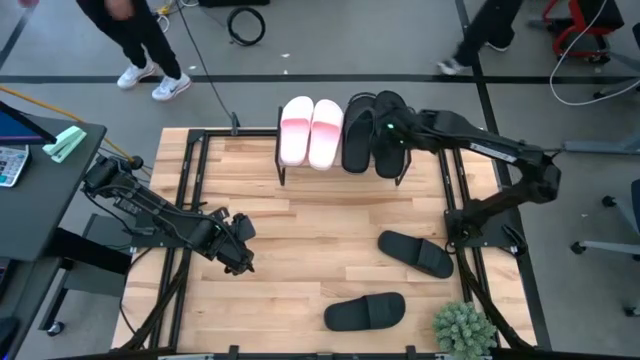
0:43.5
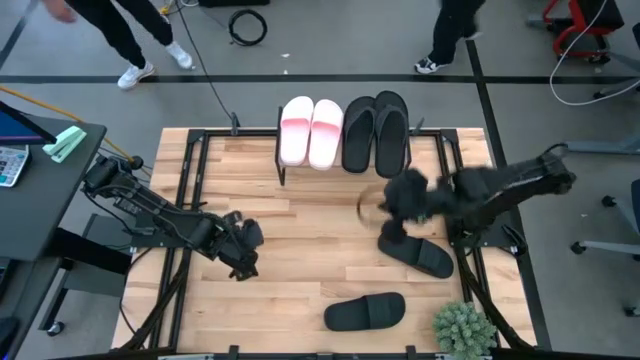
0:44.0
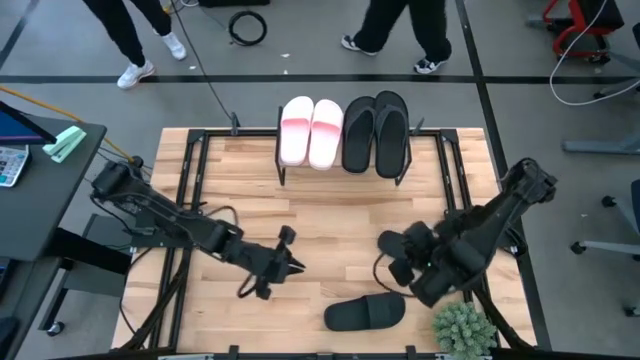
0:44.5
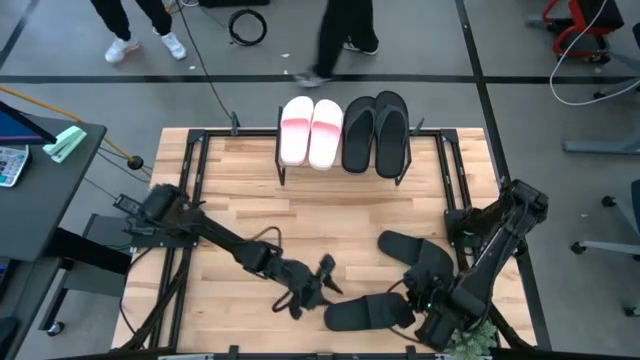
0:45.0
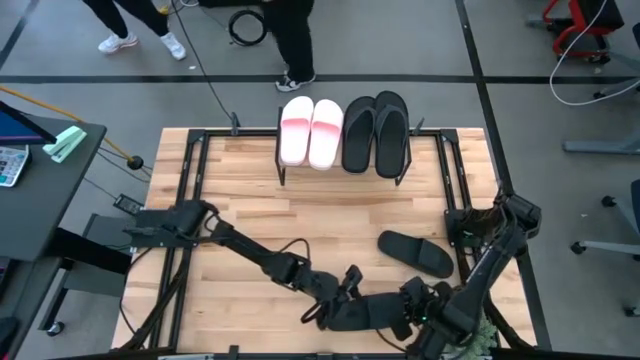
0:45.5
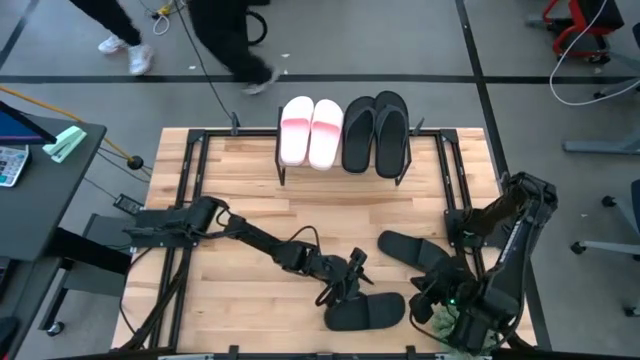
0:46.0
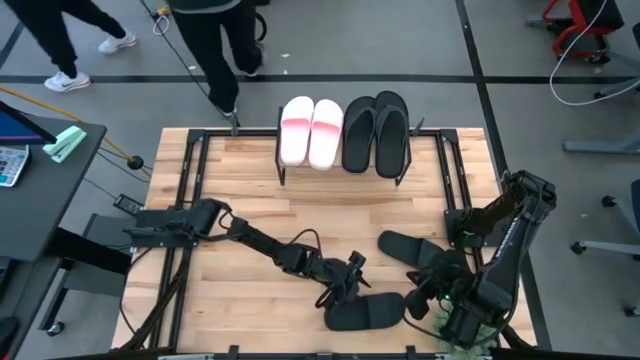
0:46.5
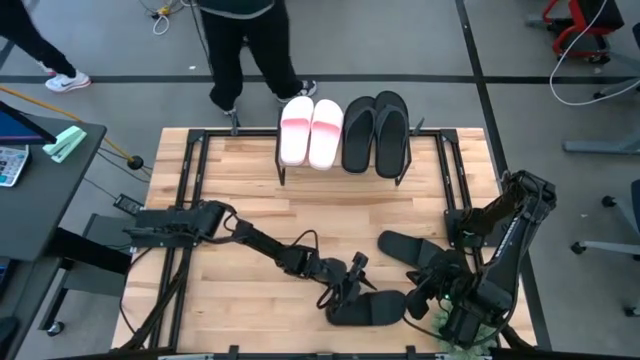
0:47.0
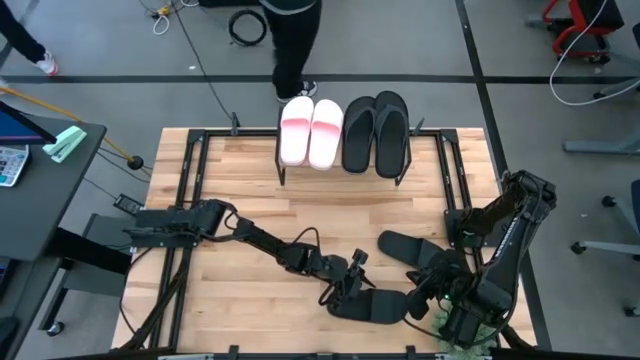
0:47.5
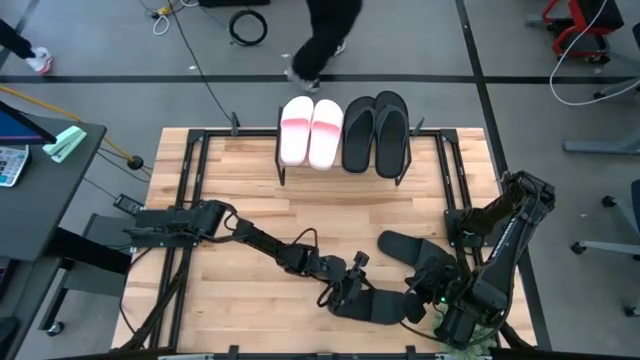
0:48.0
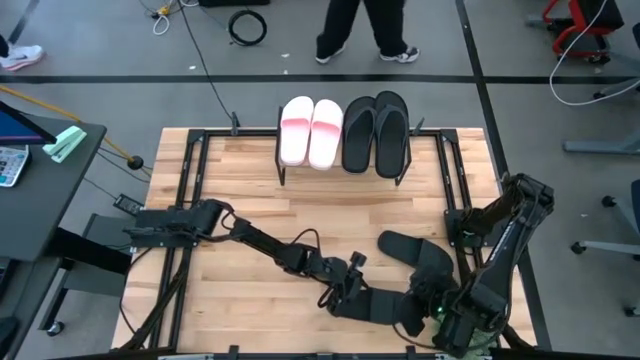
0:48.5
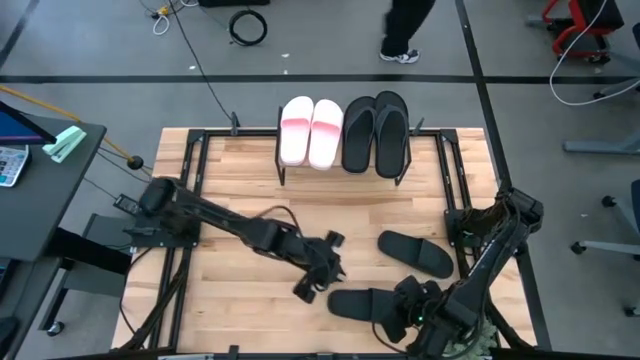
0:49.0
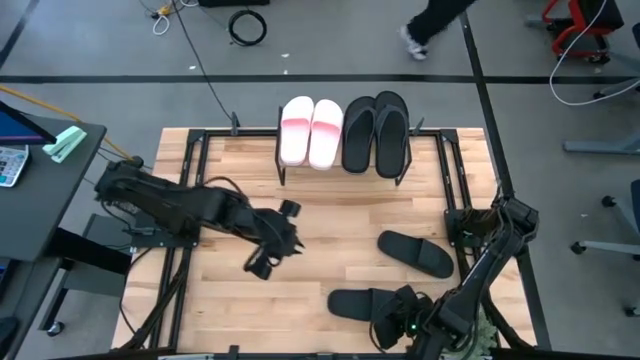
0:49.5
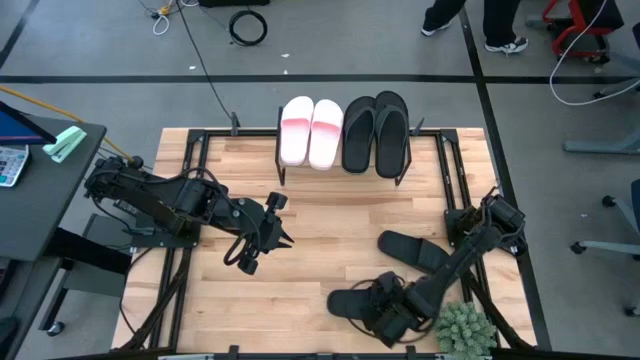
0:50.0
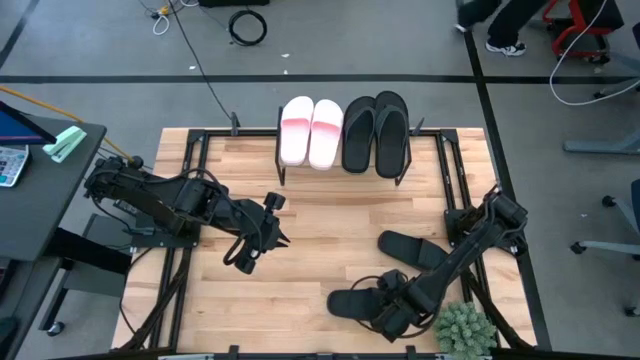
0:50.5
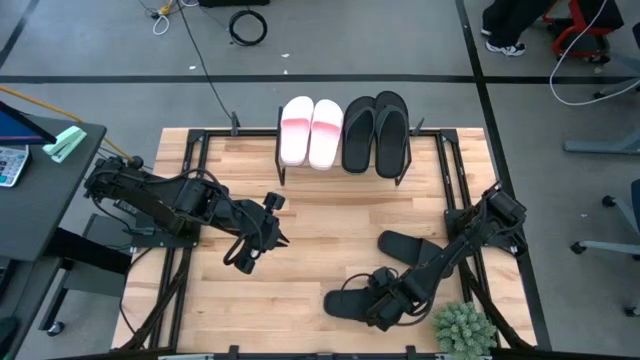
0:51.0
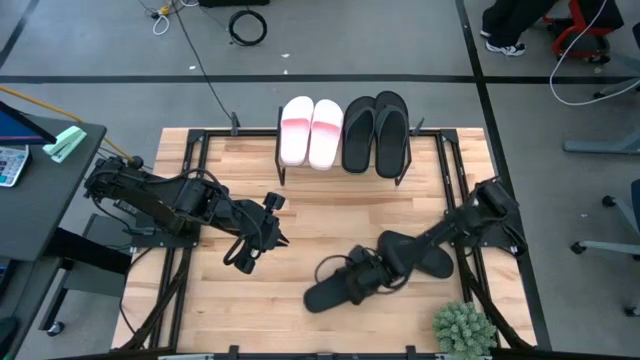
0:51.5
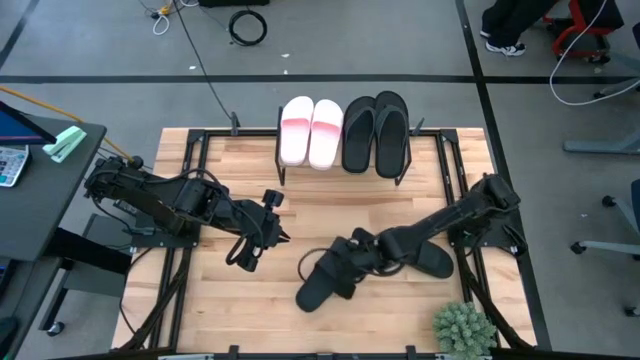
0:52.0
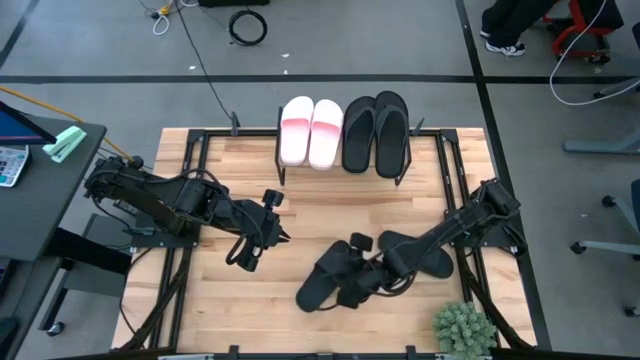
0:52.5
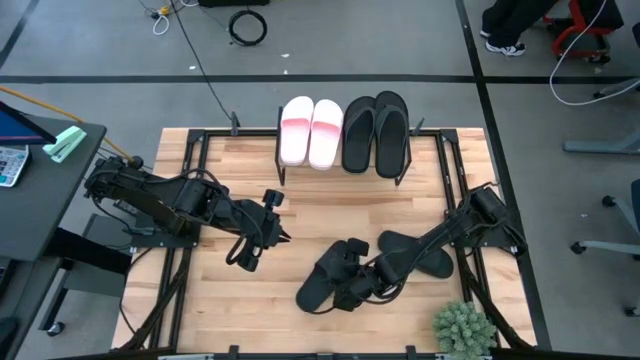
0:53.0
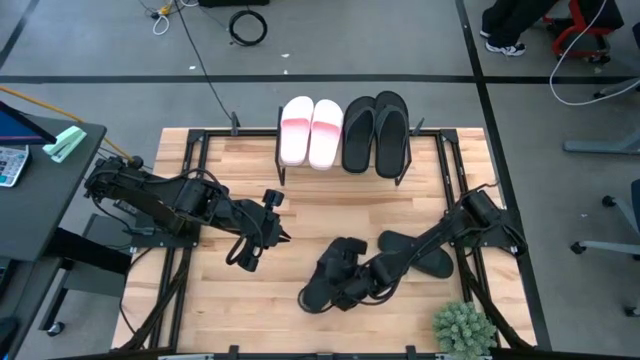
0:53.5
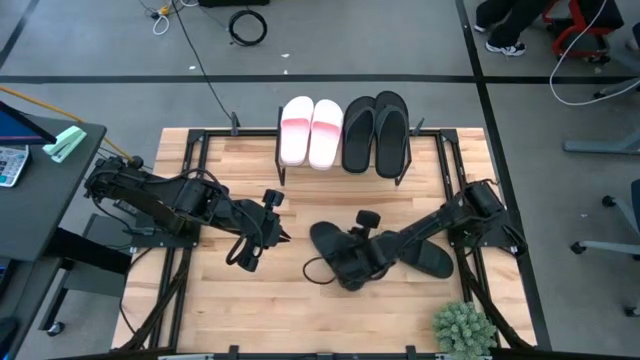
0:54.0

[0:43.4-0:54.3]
Task: Pick and place slides into the shelf
Move the bottom black slide to the middle right of the table

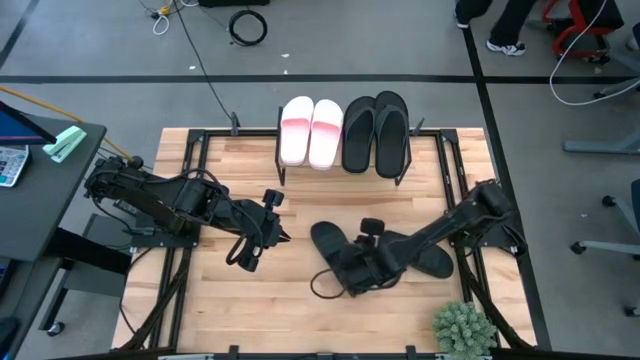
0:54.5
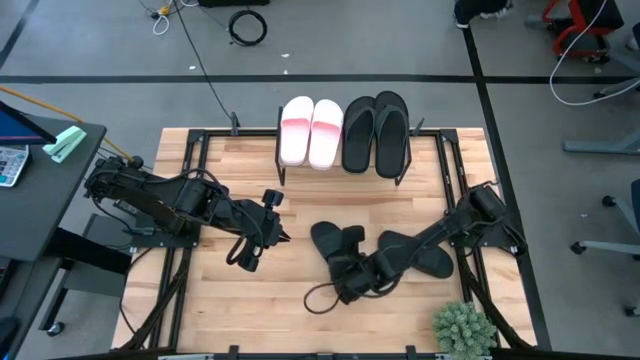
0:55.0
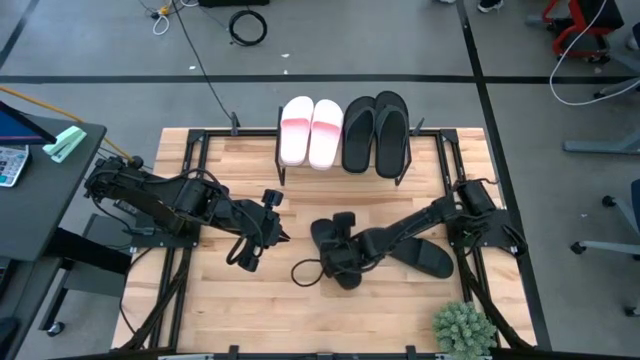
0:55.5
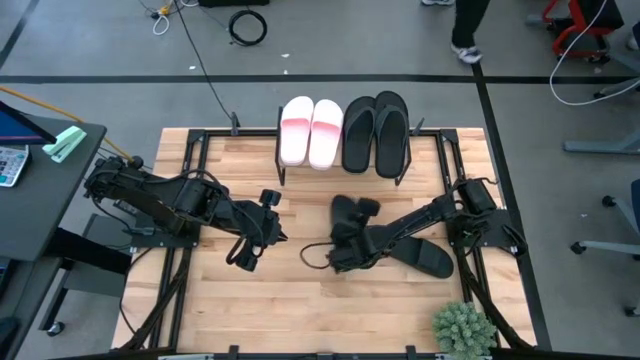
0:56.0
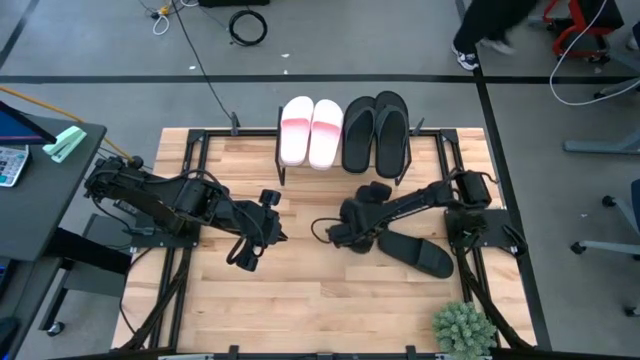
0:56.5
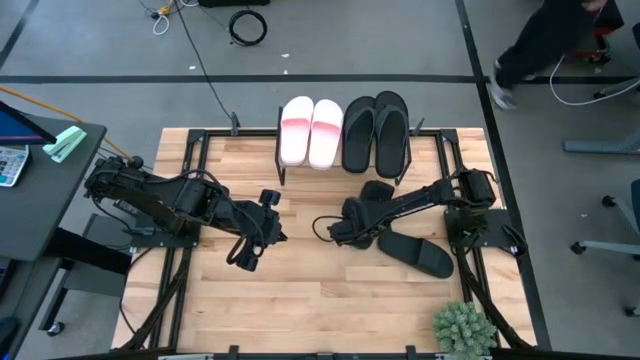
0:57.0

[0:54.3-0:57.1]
Move the bottom black slide to the middle right of the table

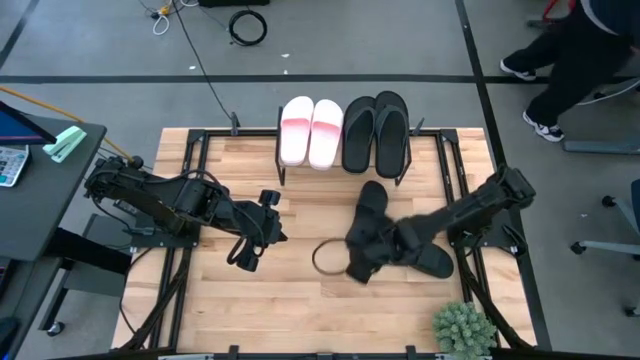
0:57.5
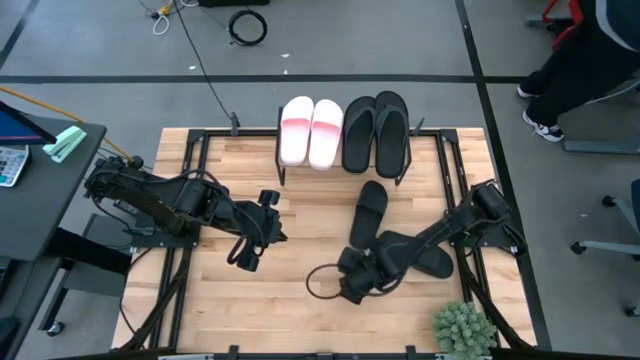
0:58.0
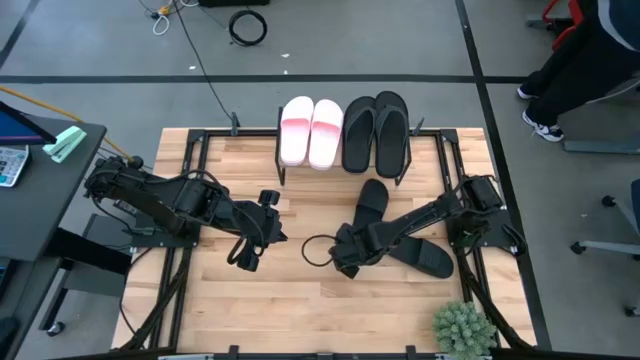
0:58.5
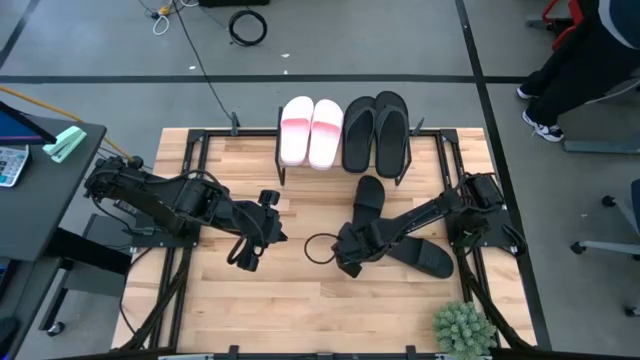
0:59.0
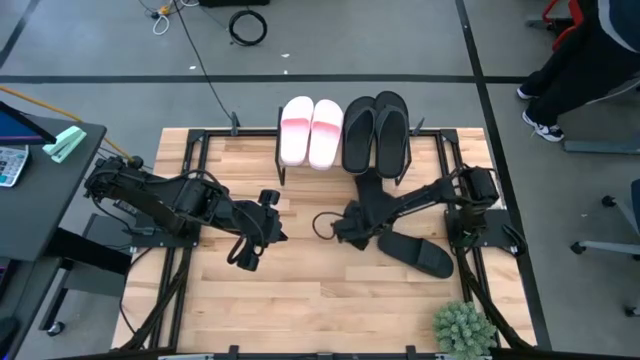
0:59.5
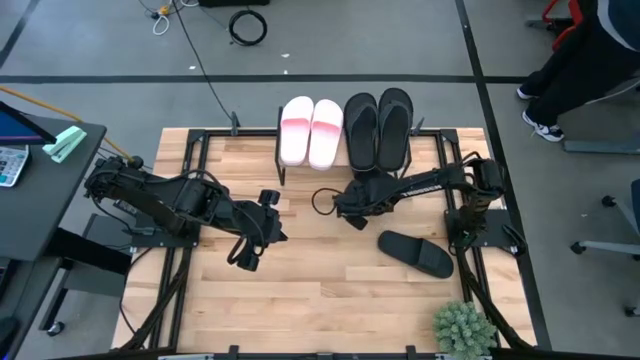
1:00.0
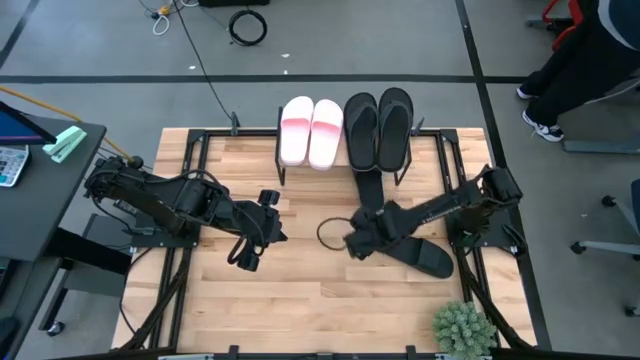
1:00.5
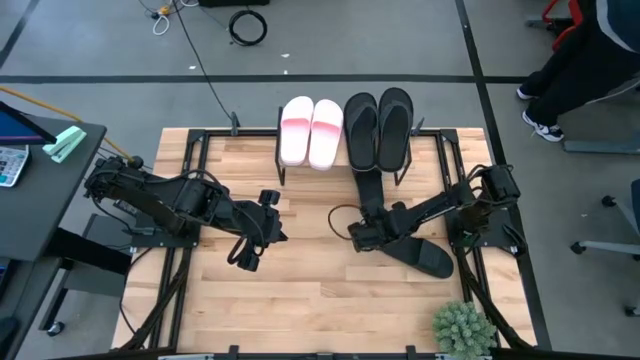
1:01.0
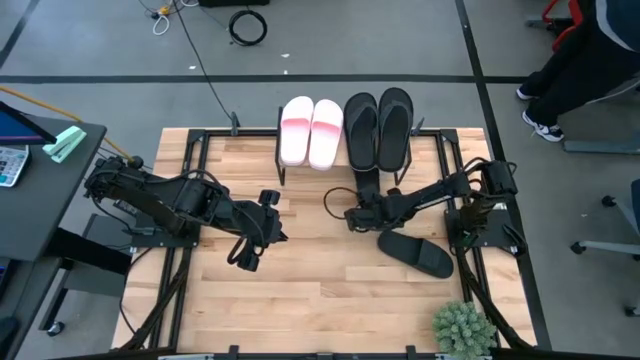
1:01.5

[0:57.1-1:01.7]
Put the bottom black slide under the shelf

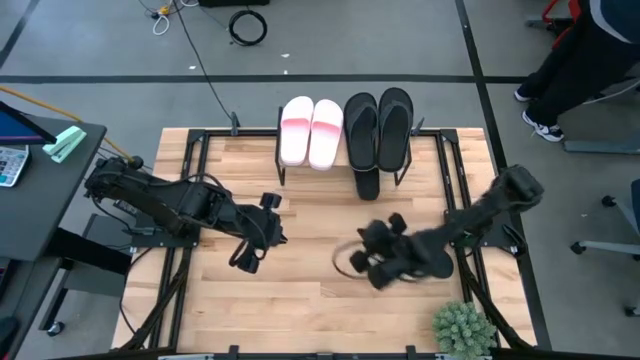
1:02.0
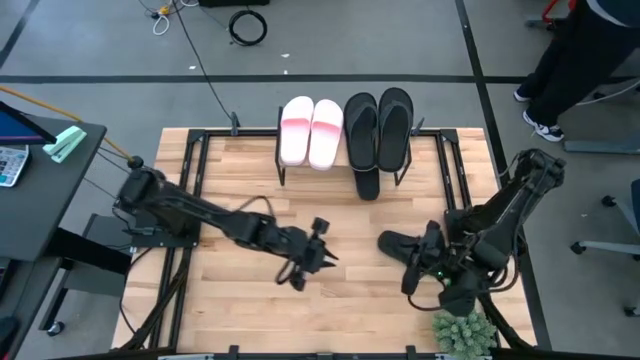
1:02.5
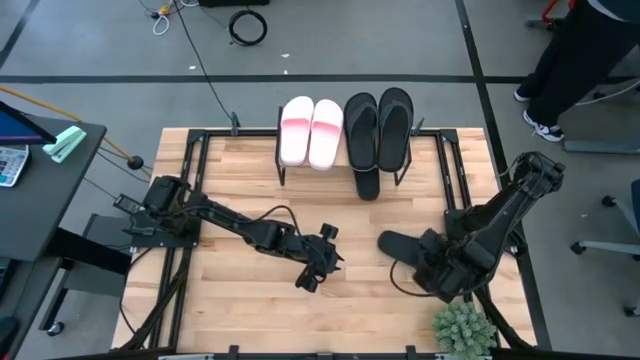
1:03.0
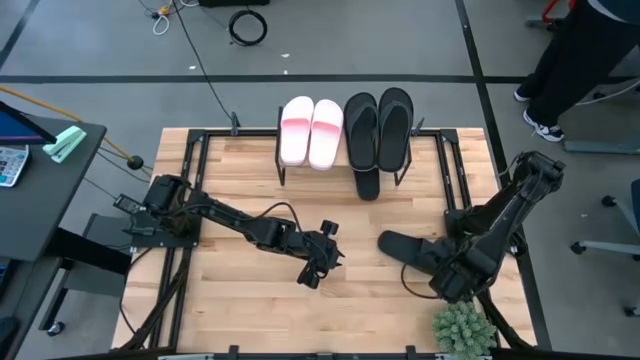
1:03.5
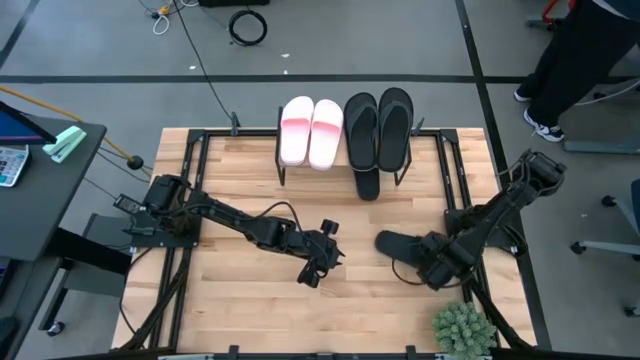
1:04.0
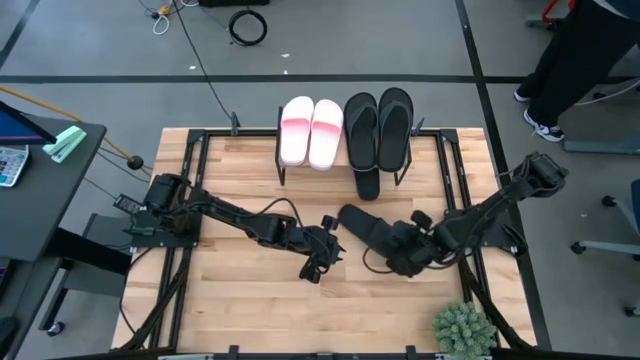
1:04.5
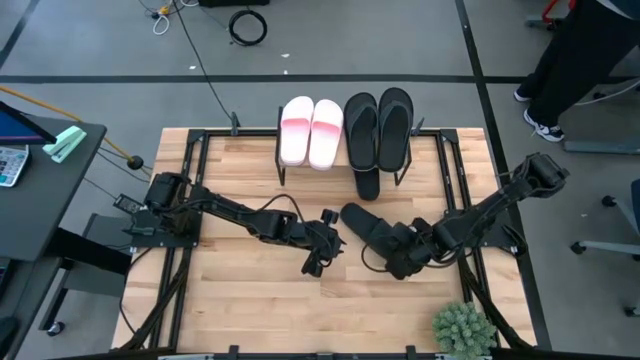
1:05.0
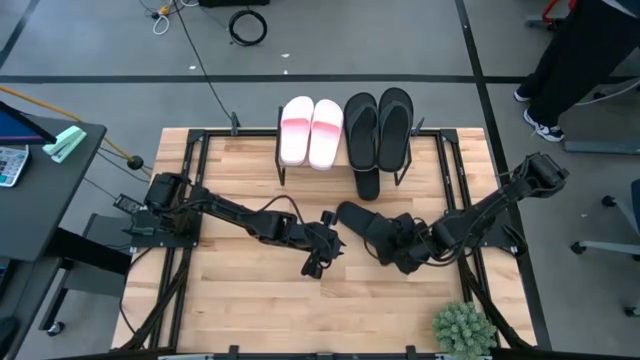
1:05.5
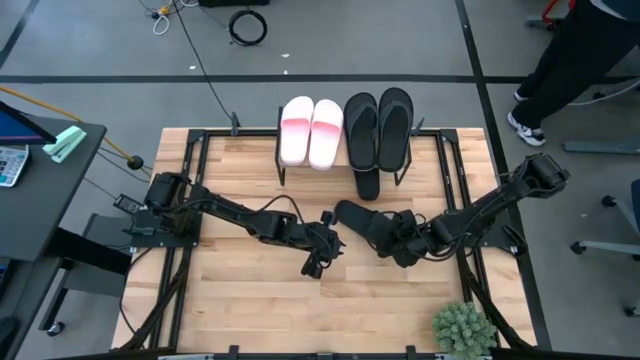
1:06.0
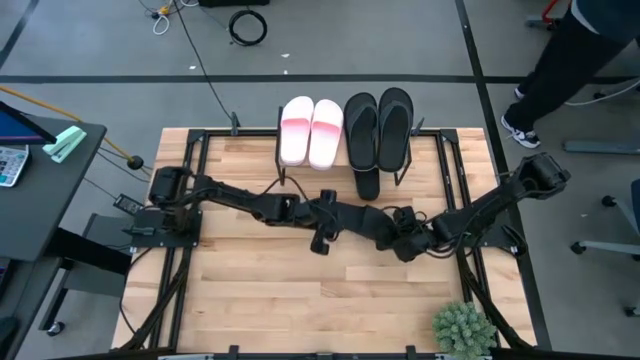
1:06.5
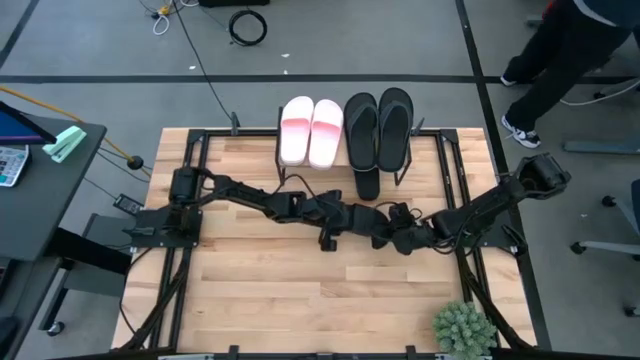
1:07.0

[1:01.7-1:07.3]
Move the black slide to the center of the table
